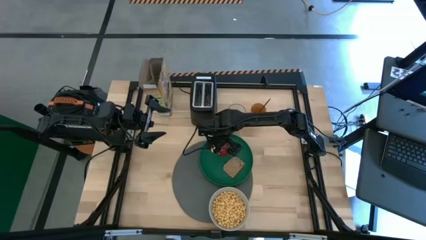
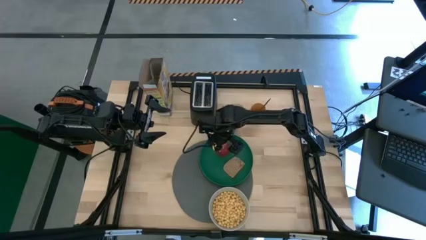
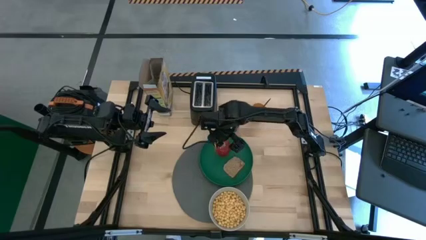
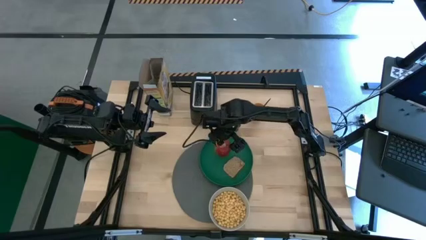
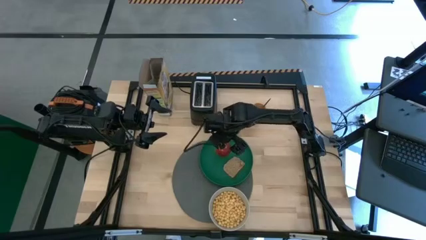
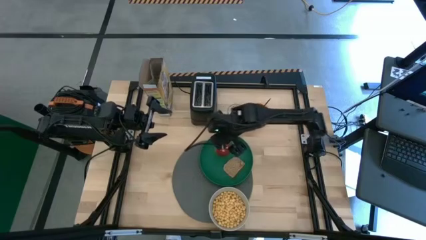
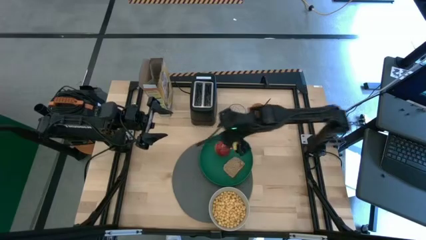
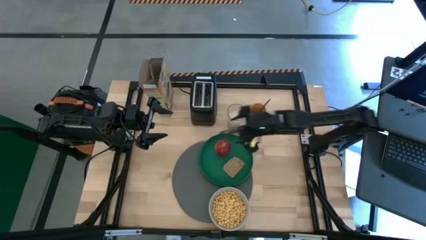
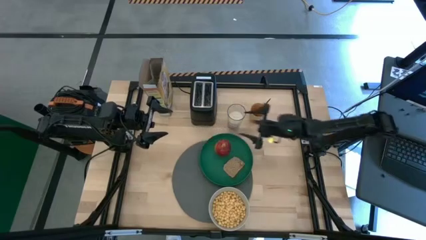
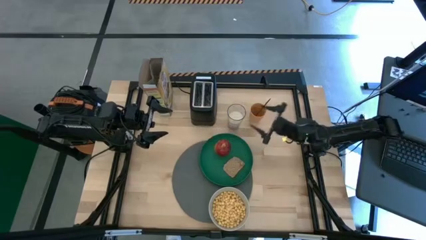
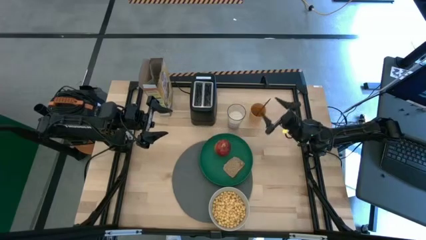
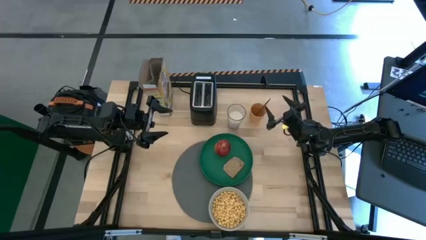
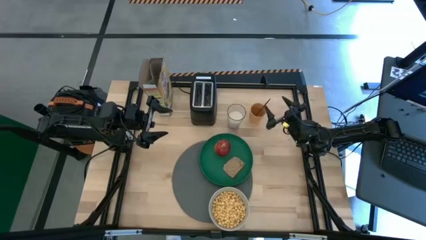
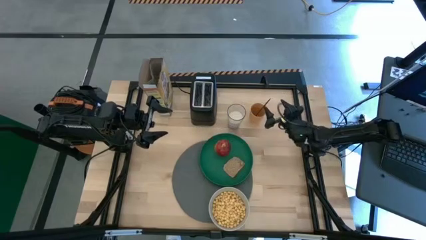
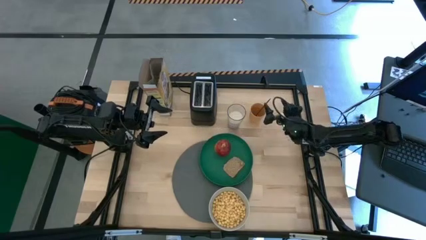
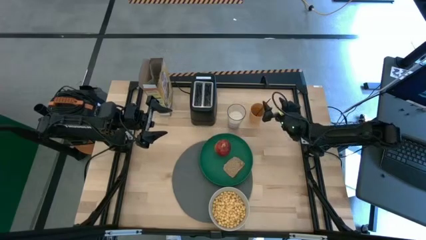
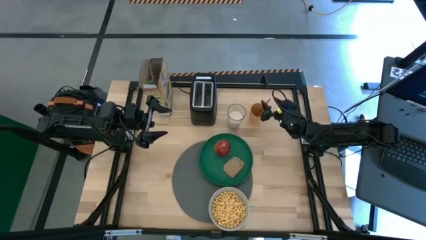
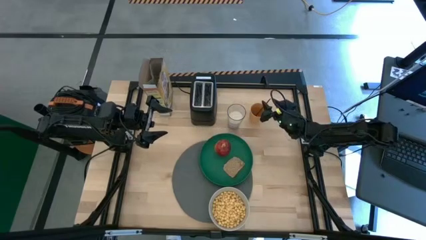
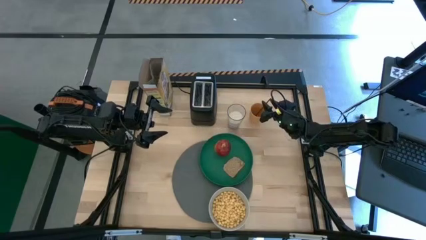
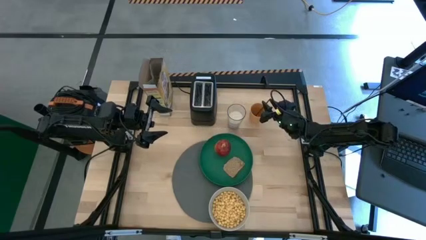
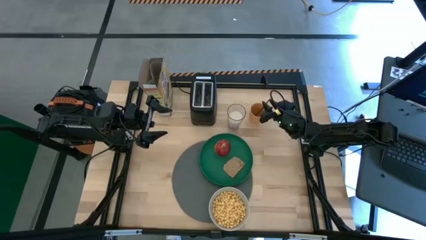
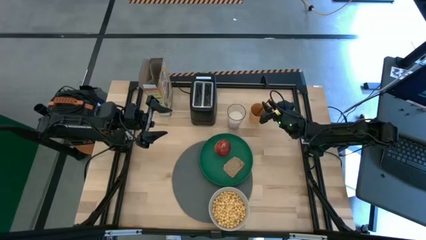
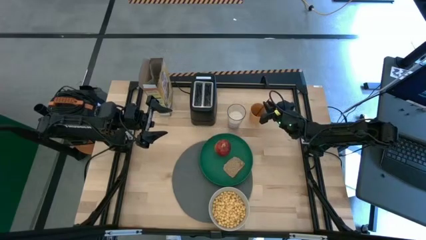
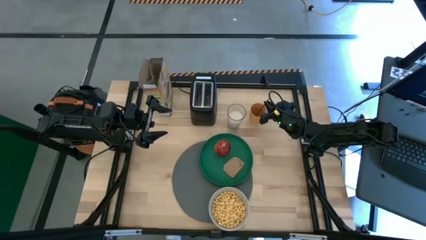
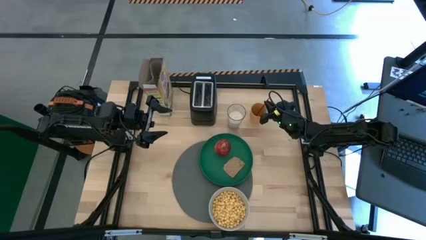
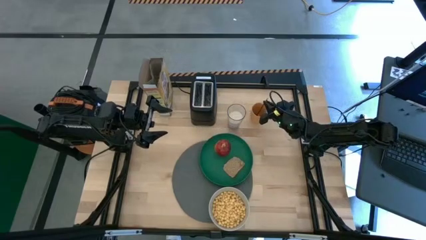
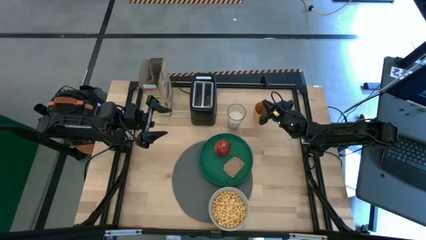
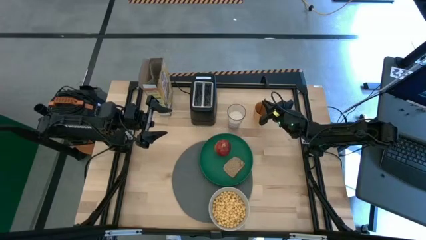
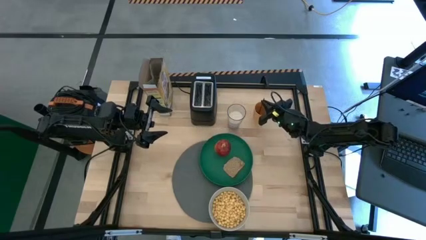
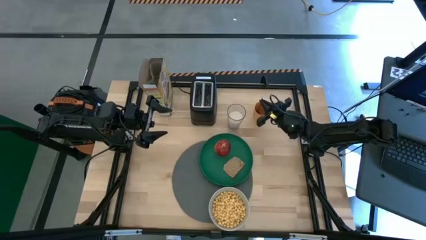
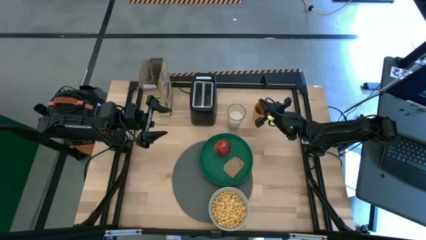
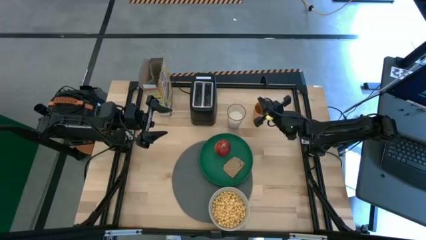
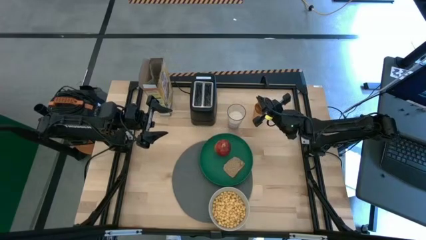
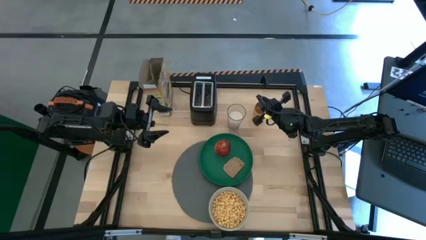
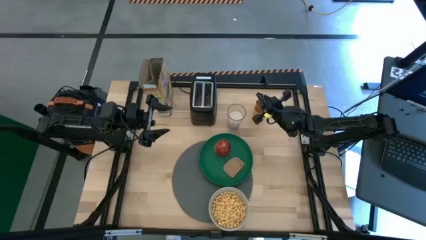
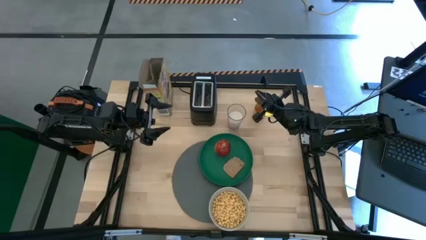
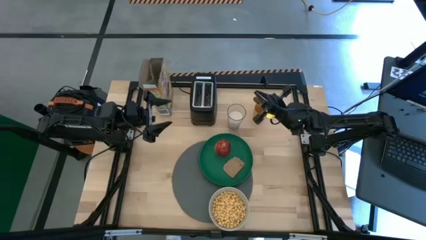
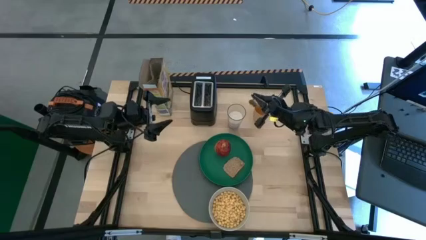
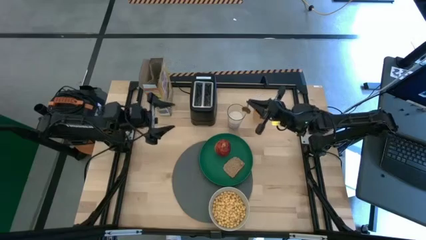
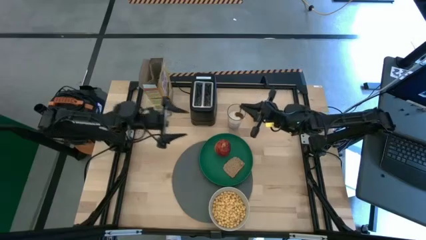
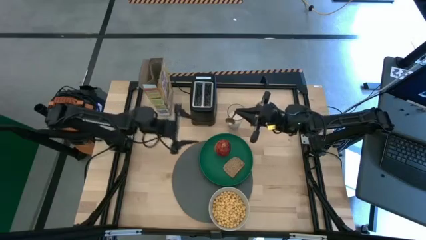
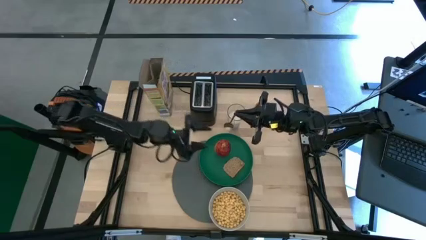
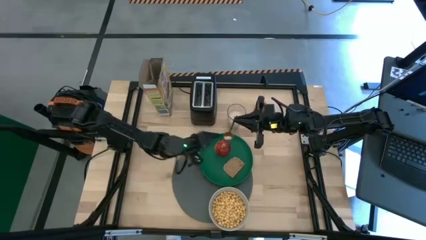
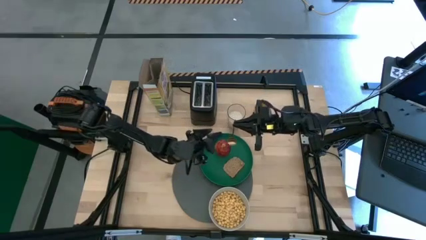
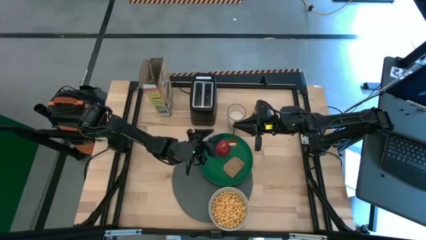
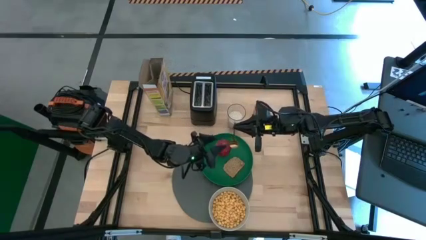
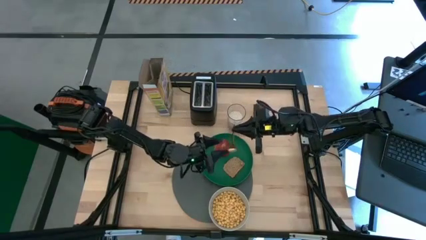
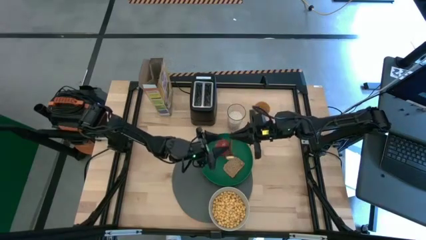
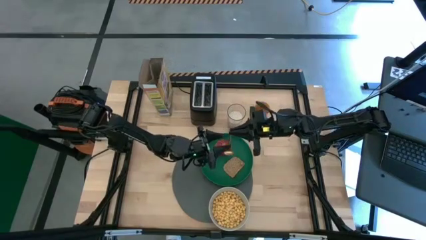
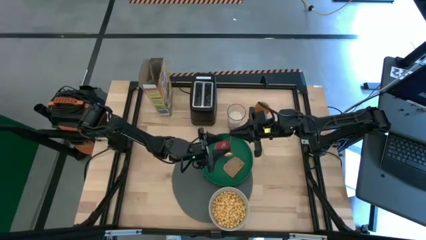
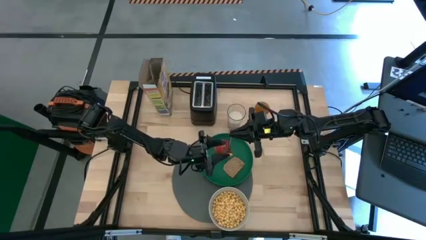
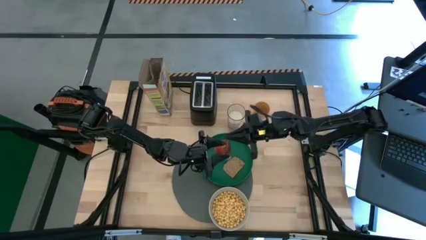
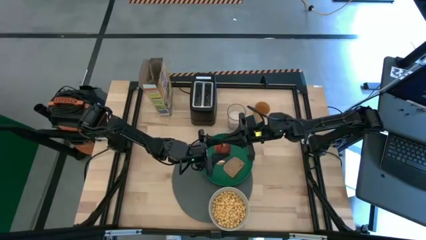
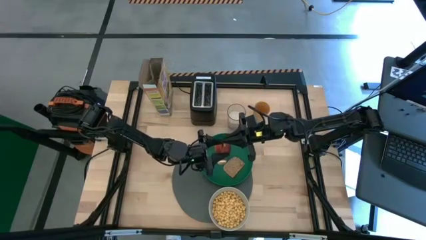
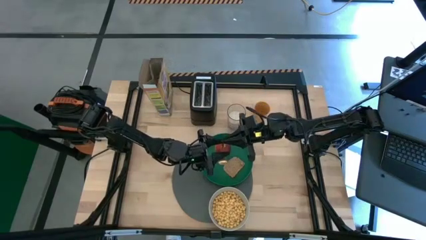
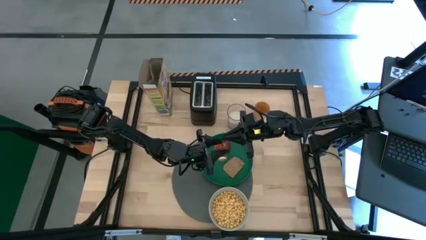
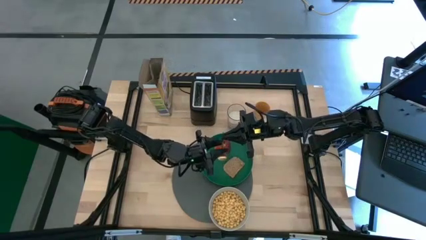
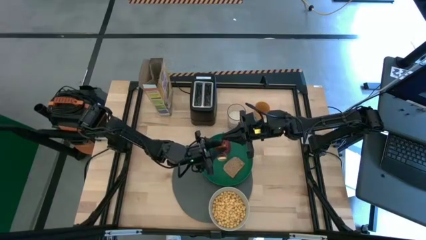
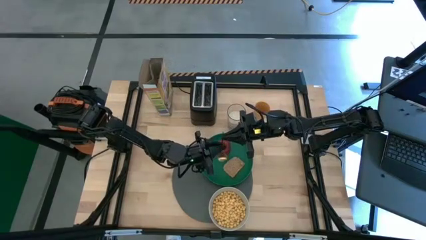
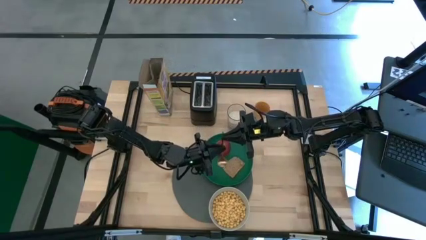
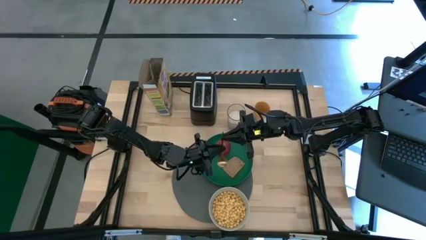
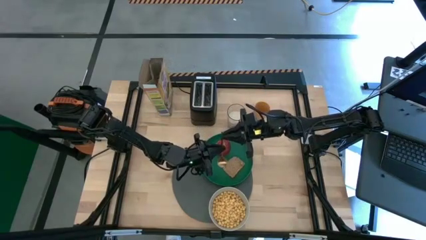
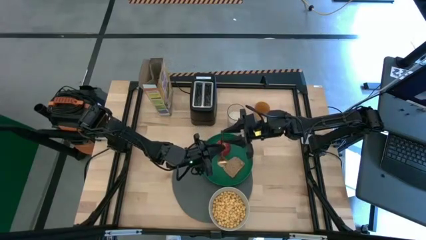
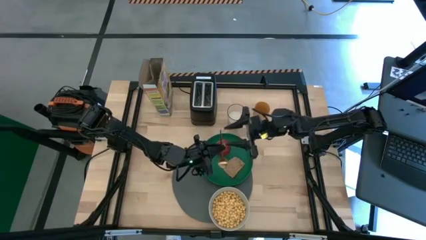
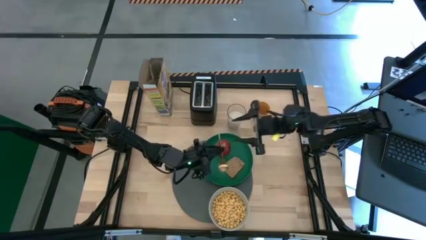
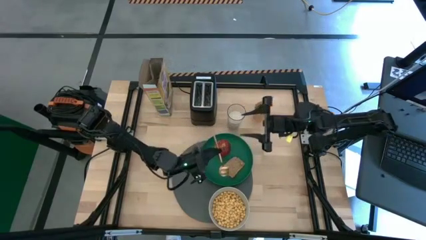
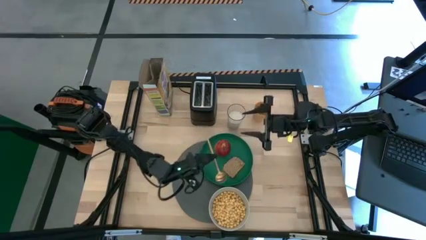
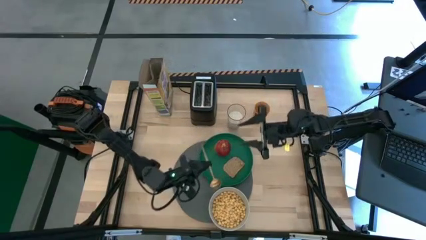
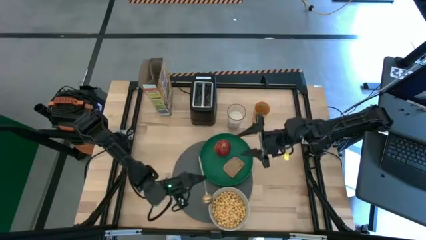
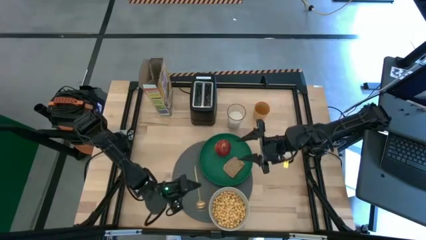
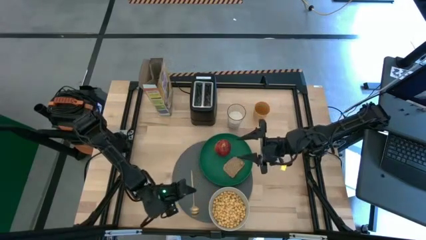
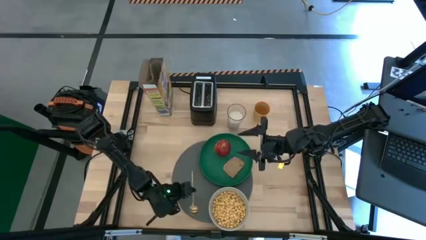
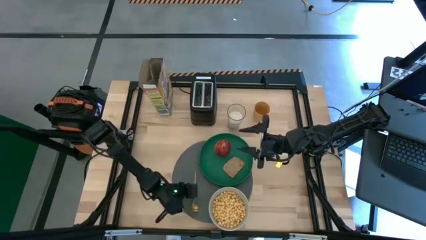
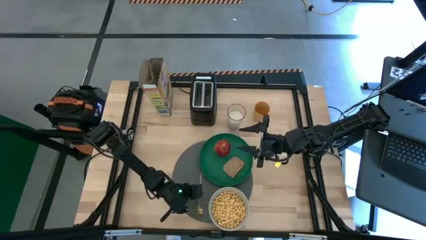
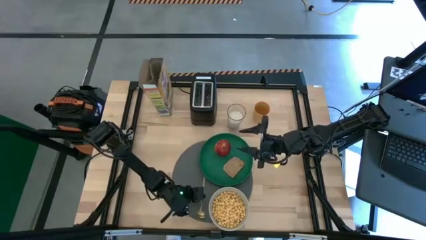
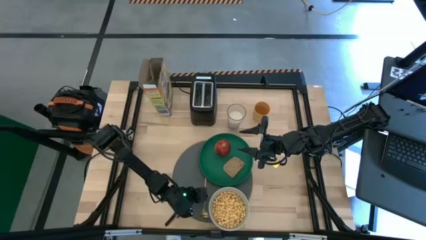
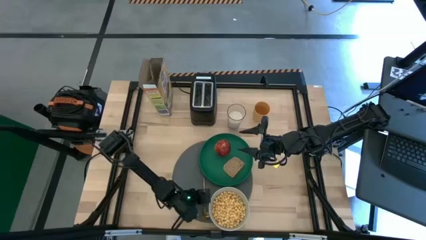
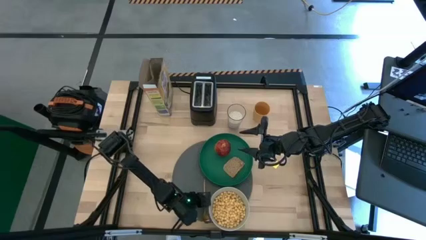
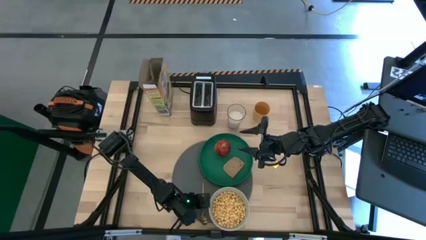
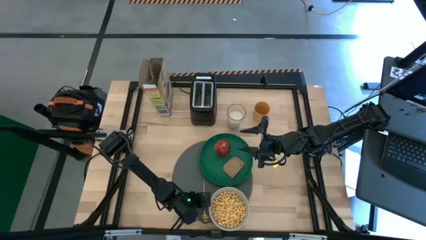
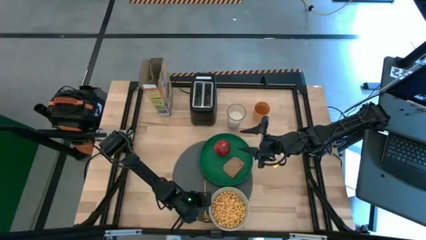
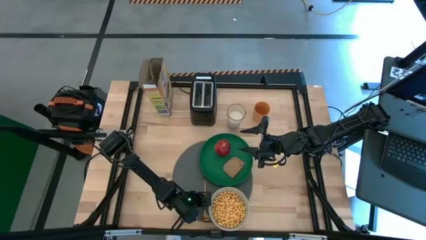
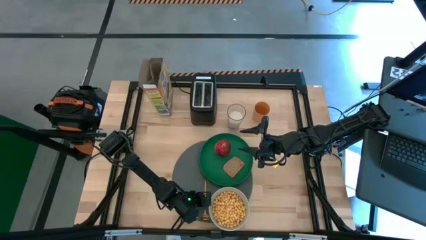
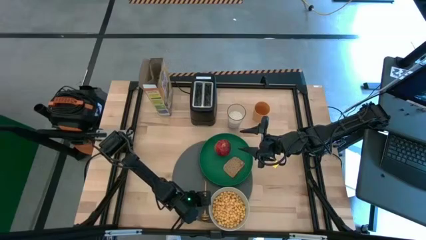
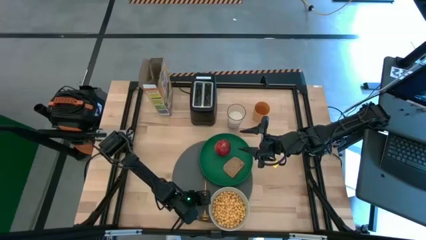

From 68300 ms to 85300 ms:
Task: Arrange a breakfast setting
Put the gold spoon on the gray table mat beside the white bowl
